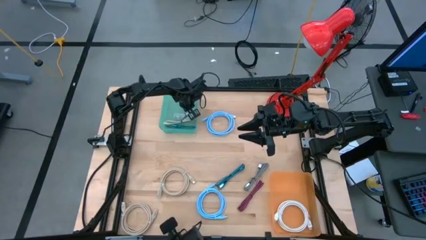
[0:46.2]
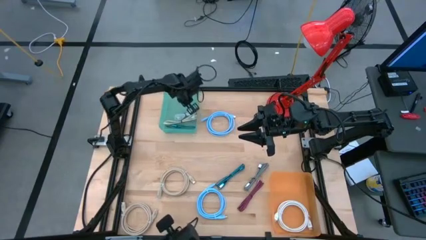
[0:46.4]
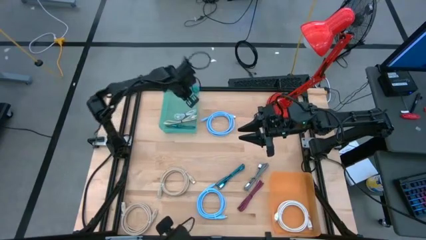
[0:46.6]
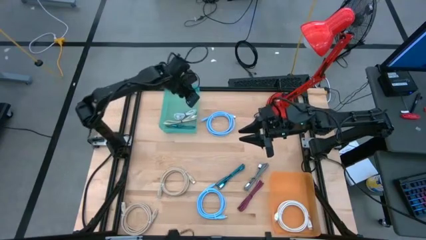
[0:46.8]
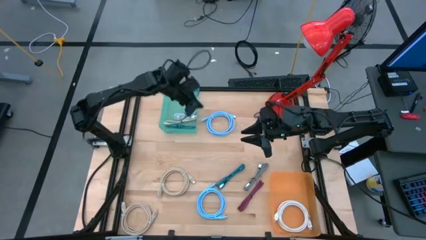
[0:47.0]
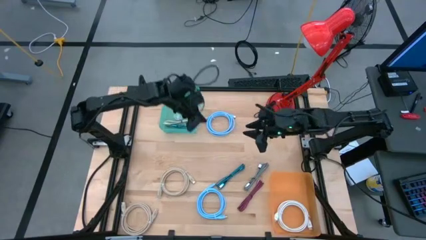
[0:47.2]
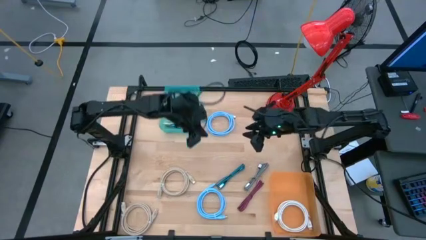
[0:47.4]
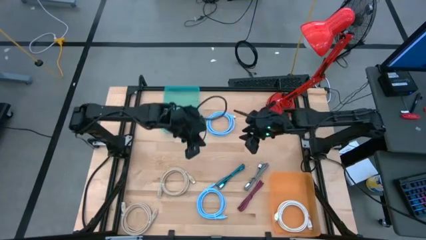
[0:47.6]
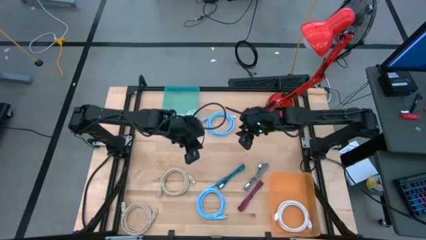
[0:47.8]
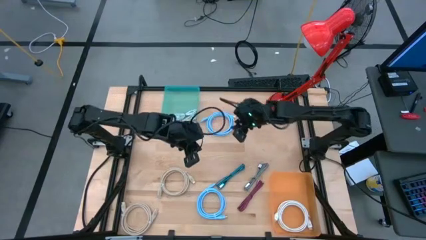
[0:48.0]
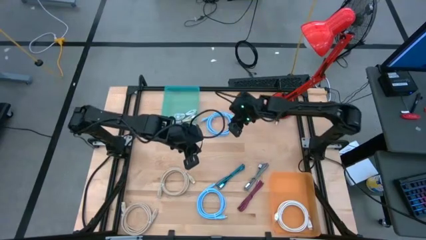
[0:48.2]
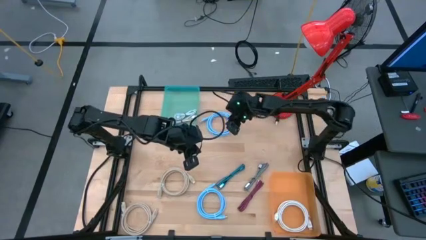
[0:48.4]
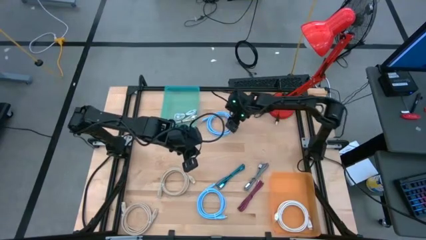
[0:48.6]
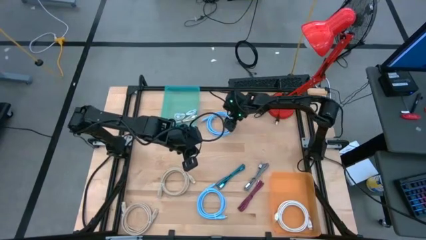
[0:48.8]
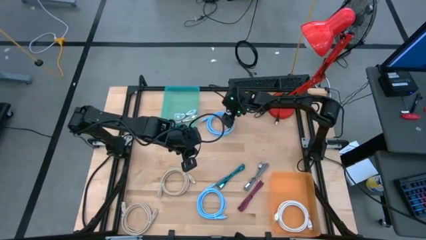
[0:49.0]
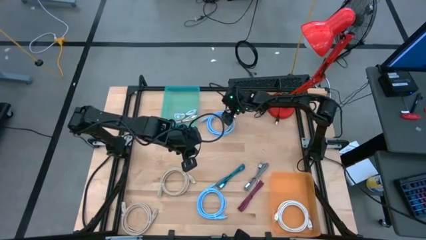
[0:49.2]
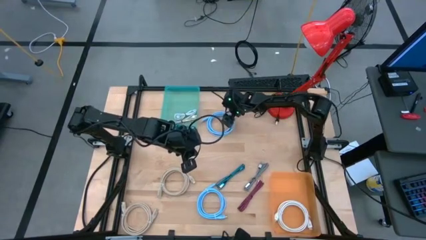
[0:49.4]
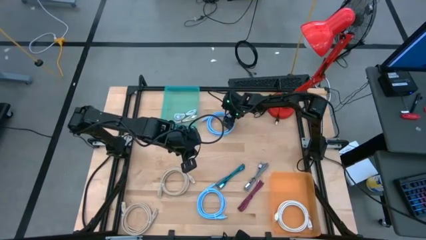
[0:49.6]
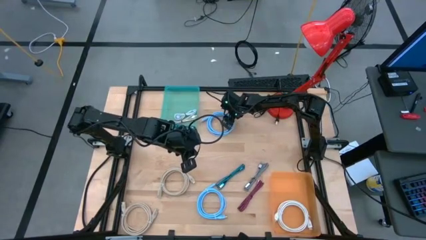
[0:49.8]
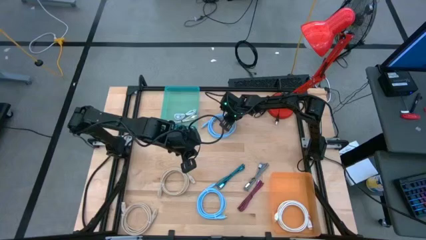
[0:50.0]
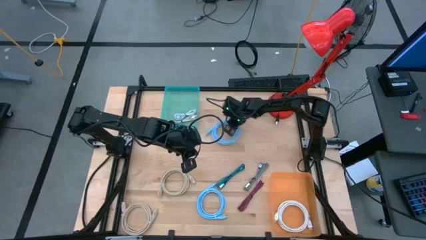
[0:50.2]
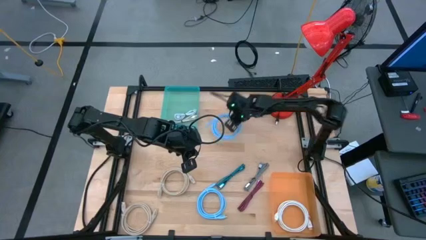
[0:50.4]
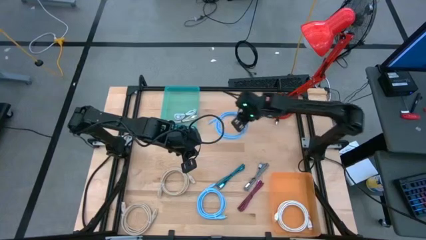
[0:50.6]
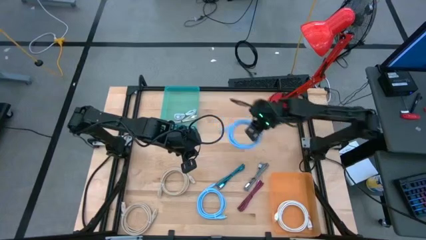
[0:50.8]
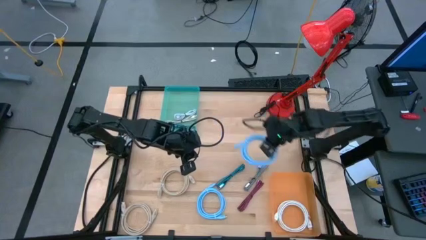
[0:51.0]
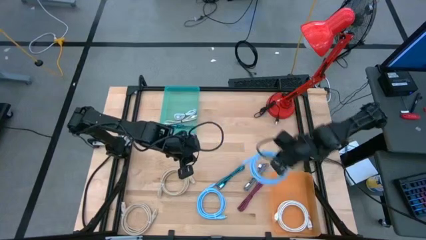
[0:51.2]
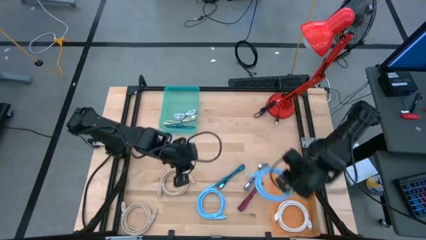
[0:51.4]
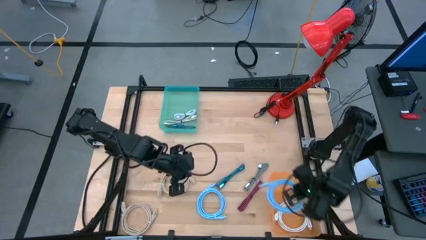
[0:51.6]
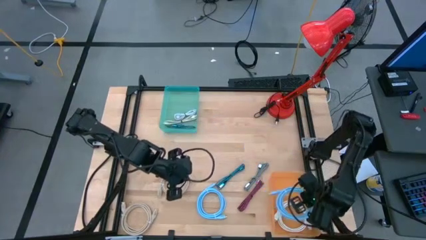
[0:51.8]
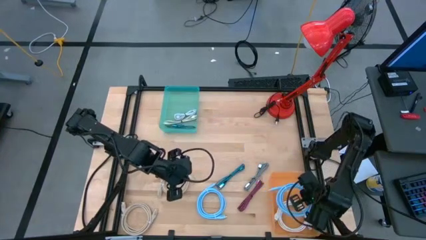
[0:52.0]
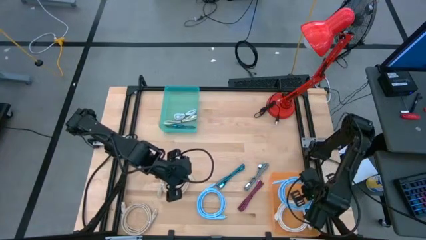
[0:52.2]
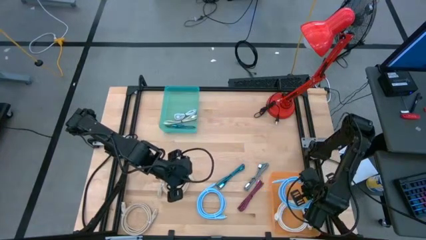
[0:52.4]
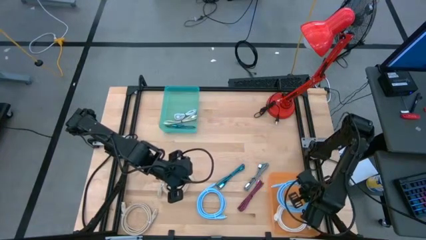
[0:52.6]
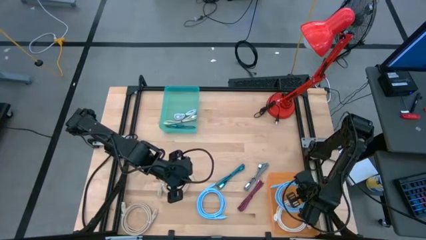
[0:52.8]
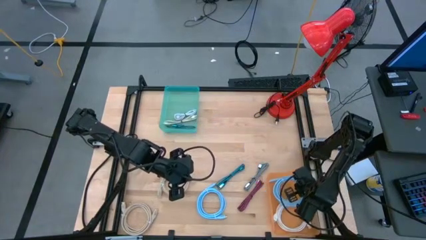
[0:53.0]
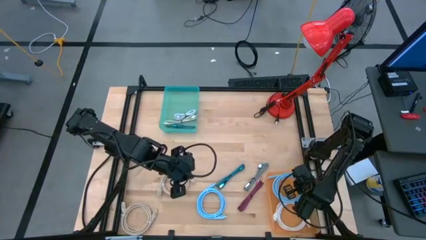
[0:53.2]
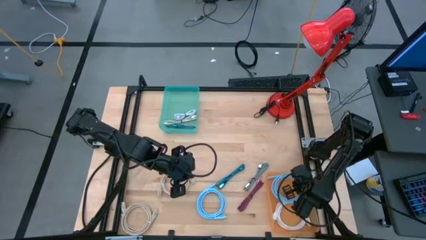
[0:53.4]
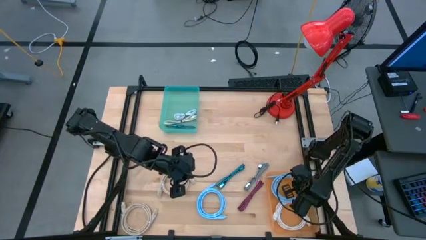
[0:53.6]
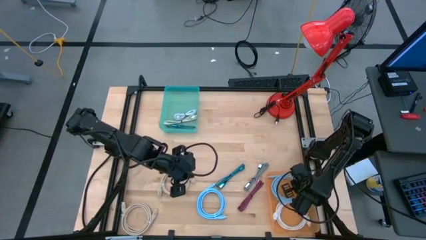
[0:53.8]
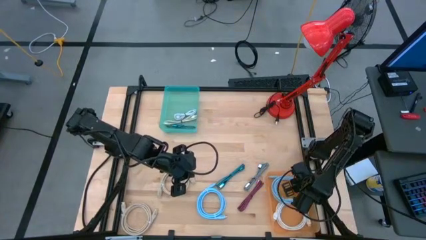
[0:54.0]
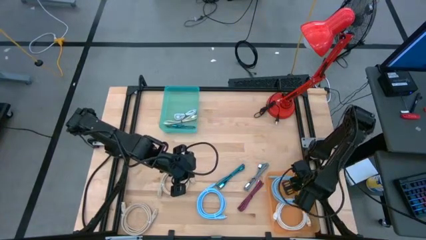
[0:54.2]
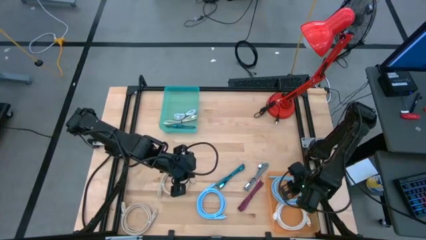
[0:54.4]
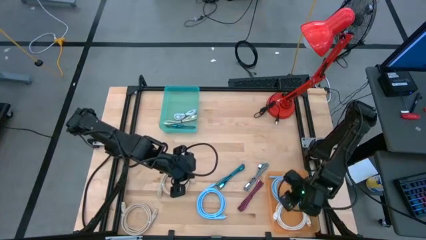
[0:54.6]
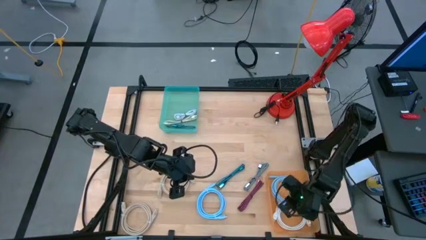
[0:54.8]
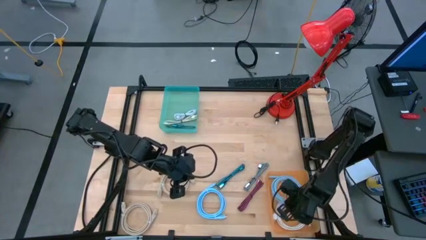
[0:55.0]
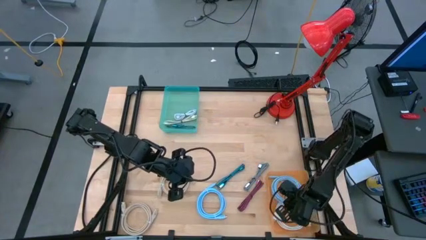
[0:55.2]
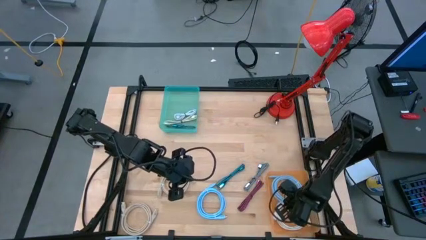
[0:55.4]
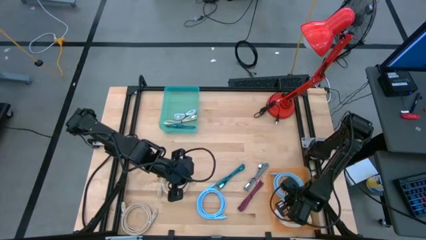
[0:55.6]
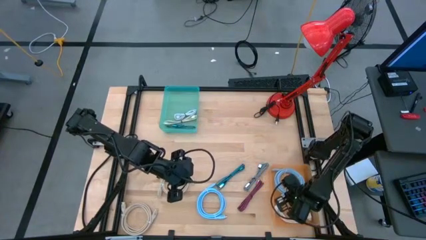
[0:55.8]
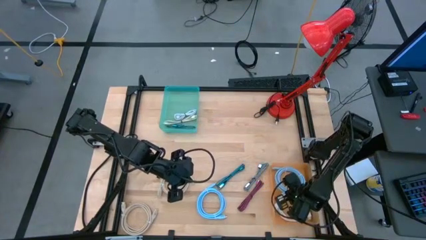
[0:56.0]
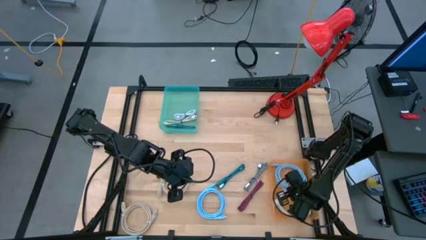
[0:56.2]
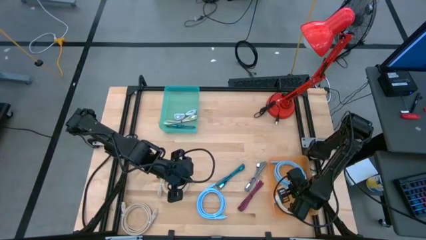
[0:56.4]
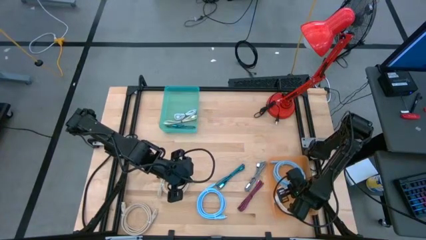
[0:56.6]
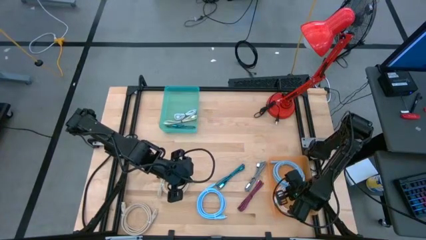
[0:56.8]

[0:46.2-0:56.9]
Task: Pick & Place USB Port
Put the top blue HDMI cable into the orange bin

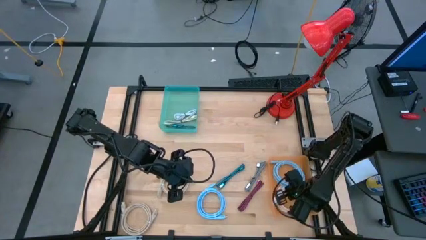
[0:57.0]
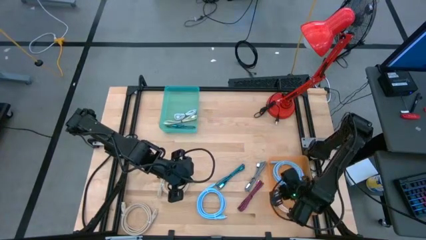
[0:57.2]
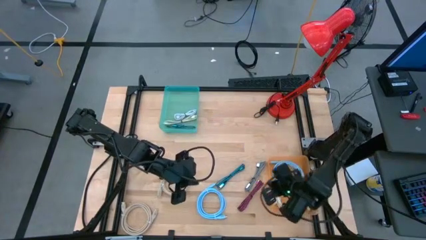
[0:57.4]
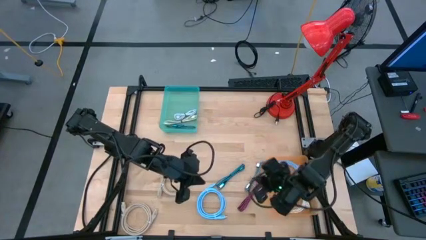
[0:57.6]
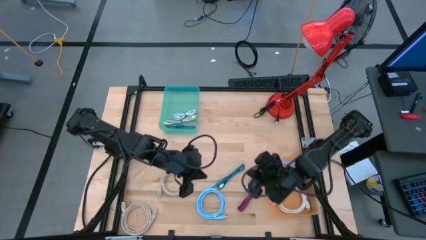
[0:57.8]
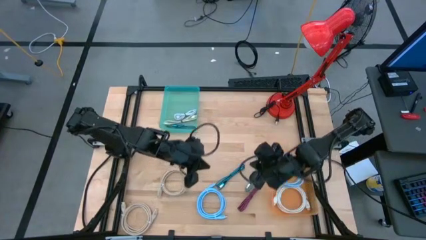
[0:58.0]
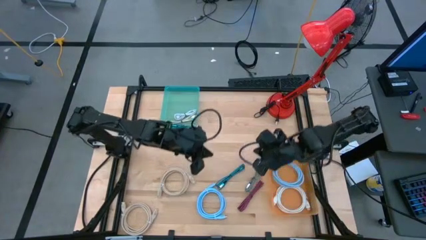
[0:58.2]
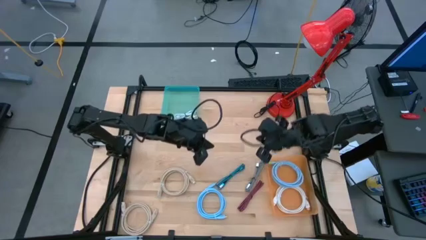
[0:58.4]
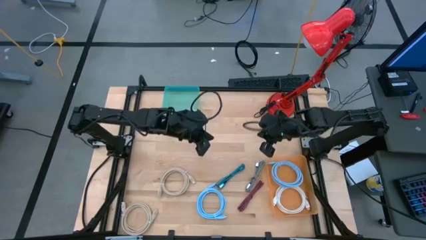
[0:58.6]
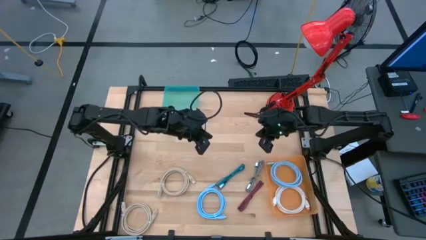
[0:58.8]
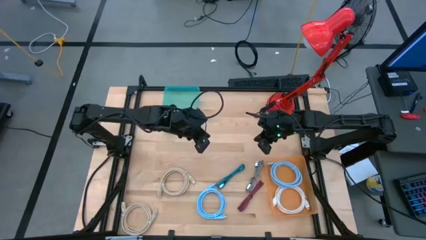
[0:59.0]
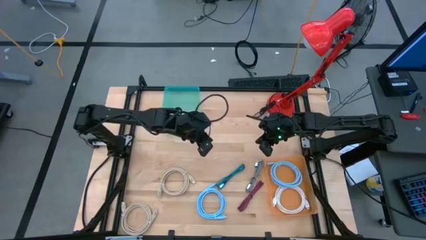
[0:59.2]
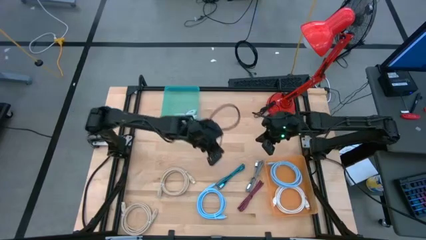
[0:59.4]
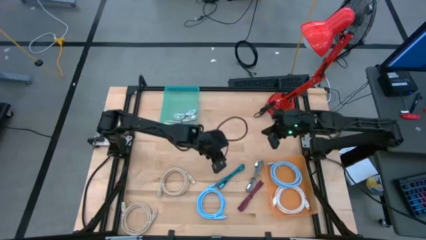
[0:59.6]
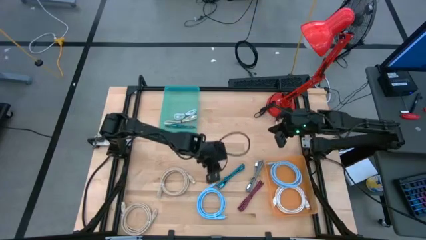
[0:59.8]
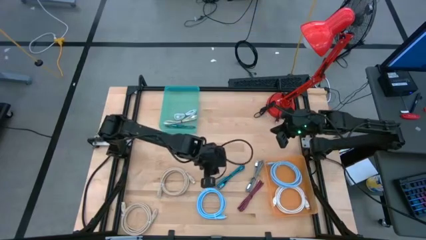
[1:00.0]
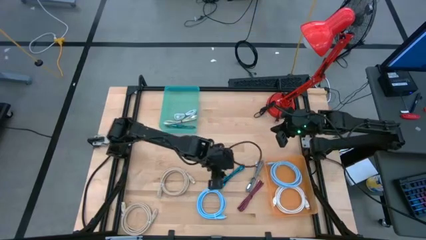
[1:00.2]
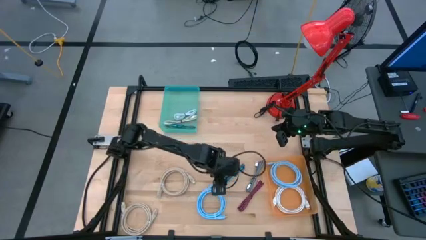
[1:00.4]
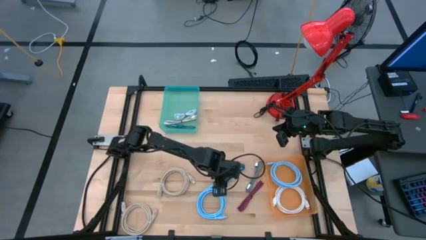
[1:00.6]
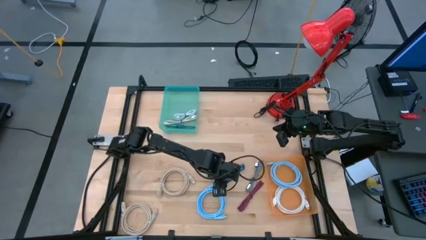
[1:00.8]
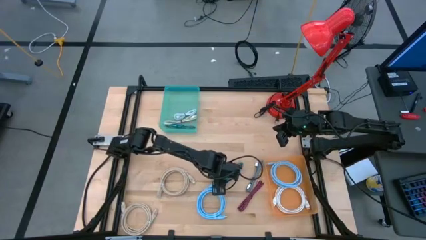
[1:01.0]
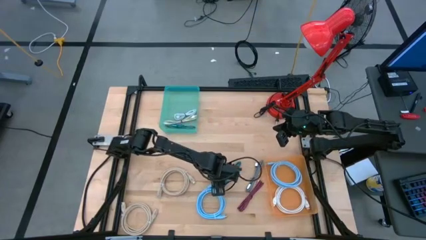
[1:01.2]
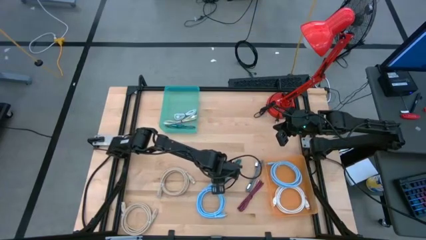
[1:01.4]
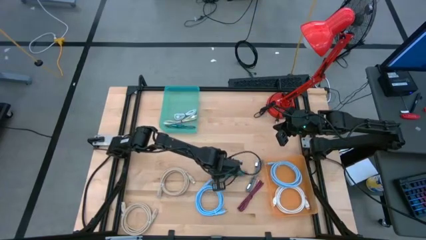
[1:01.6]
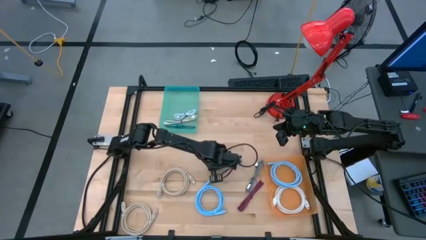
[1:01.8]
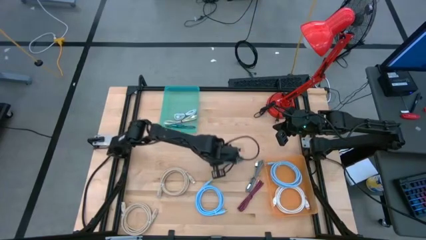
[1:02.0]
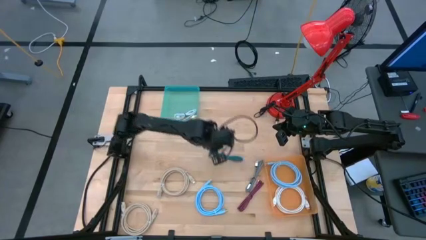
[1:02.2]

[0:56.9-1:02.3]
Put the top blue USB cable into the blue bin

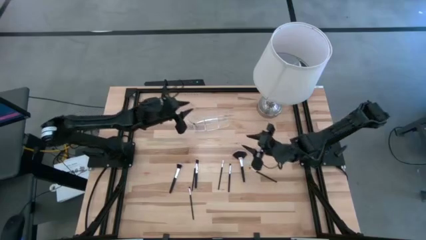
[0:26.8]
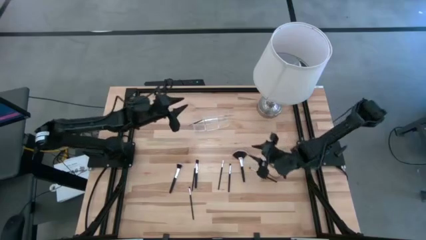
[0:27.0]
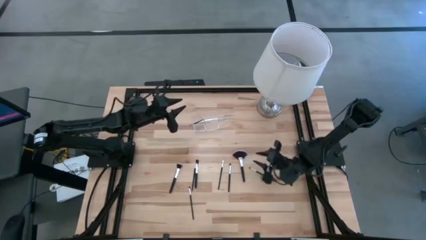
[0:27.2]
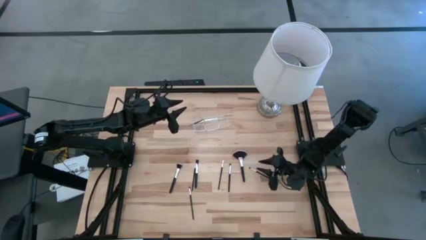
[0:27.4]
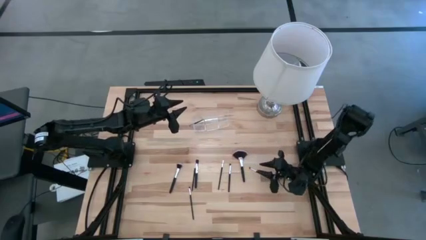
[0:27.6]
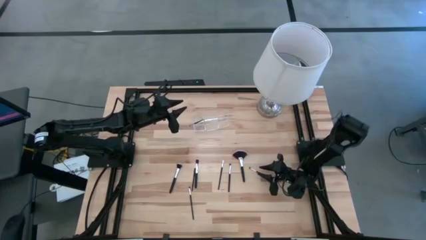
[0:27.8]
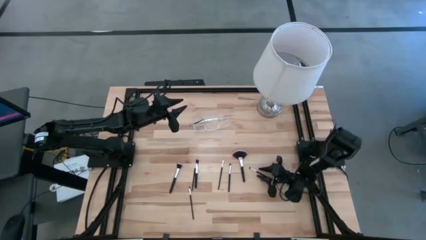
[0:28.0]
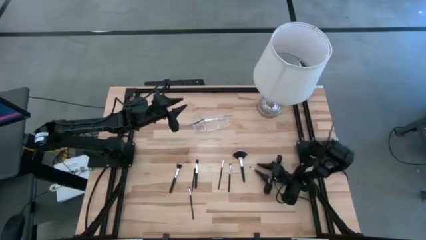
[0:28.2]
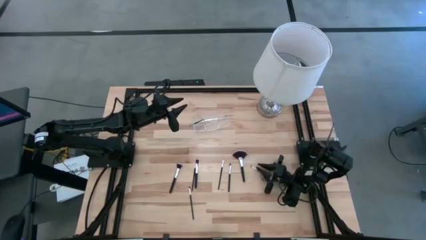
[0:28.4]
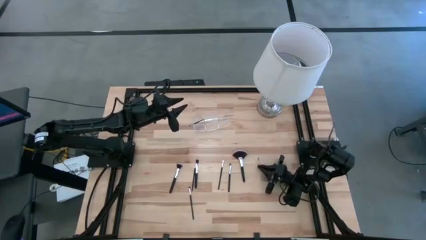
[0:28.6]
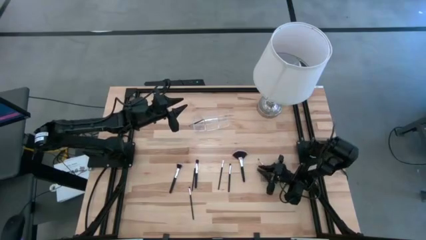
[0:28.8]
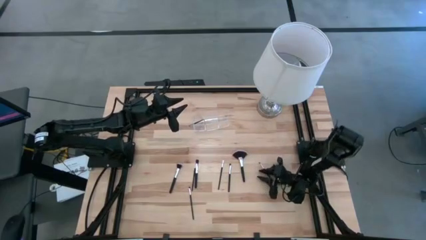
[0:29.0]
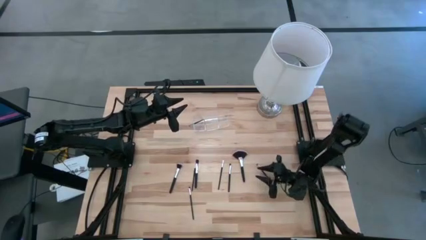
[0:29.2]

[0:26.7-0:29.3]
Task: Sort items
Put the right black eyeshadow brush into the transparent organizer
